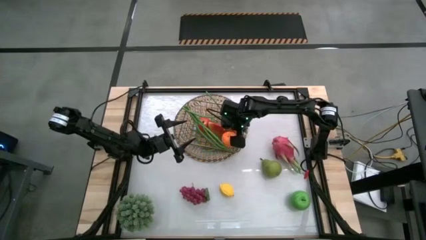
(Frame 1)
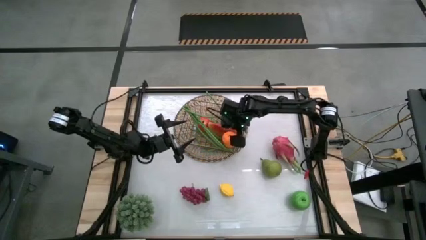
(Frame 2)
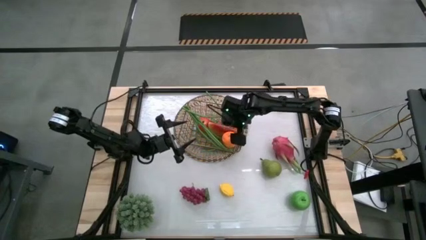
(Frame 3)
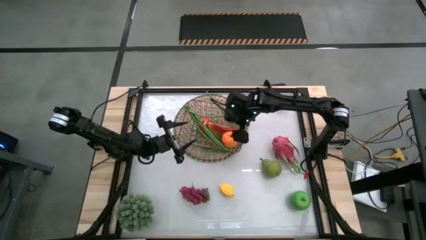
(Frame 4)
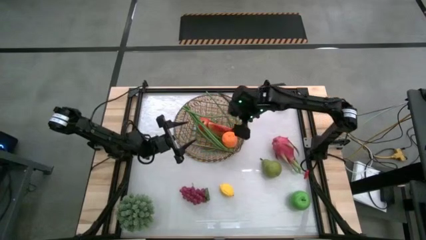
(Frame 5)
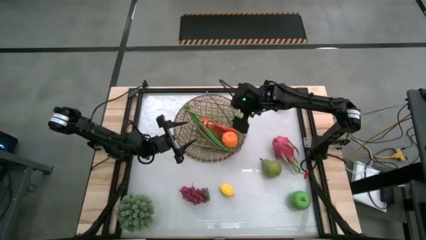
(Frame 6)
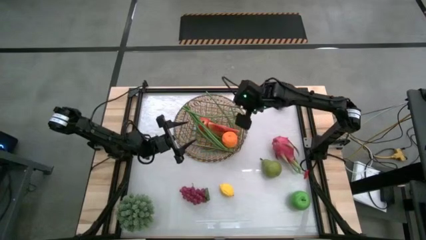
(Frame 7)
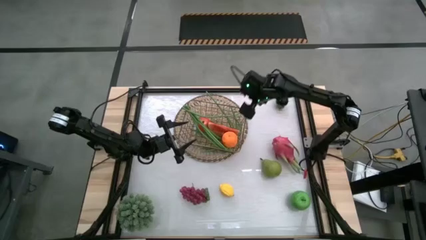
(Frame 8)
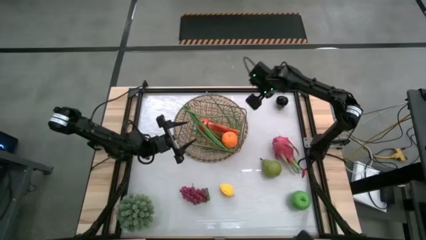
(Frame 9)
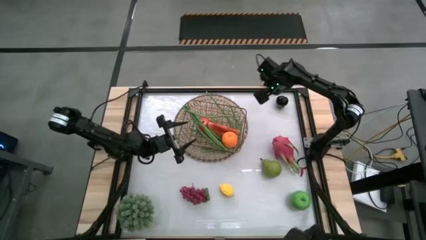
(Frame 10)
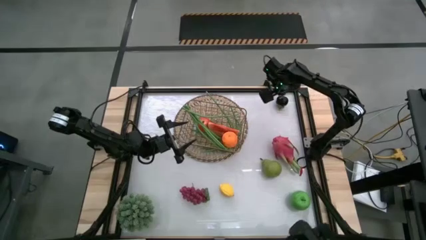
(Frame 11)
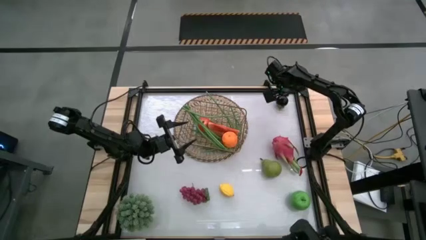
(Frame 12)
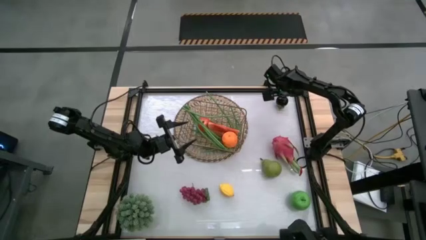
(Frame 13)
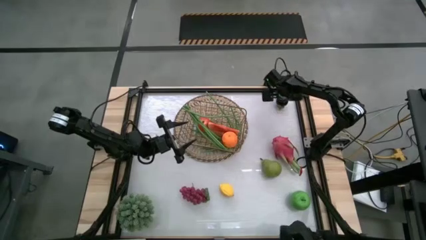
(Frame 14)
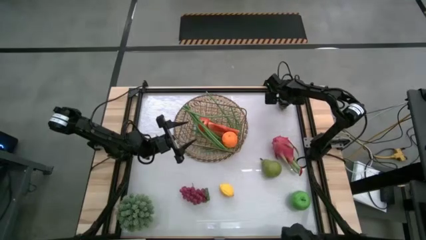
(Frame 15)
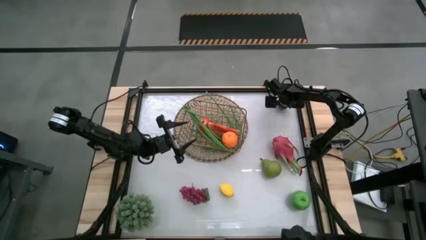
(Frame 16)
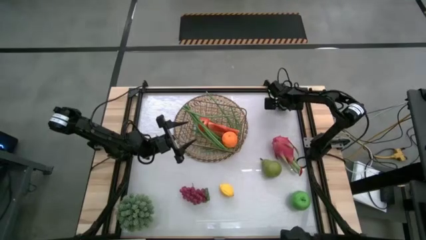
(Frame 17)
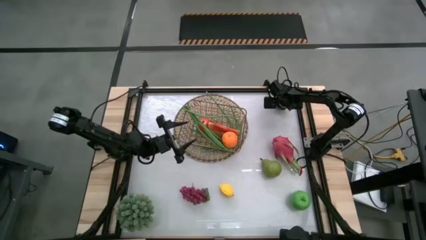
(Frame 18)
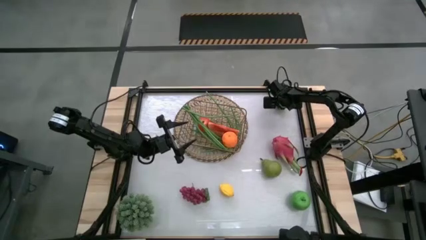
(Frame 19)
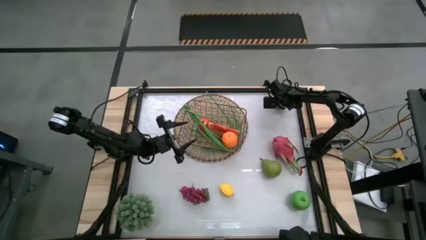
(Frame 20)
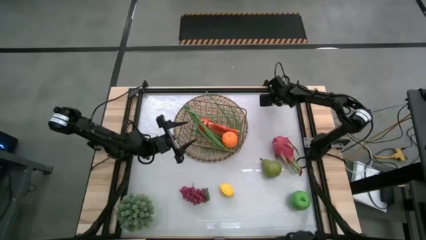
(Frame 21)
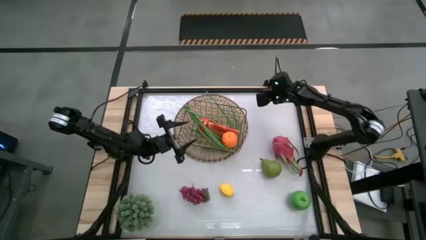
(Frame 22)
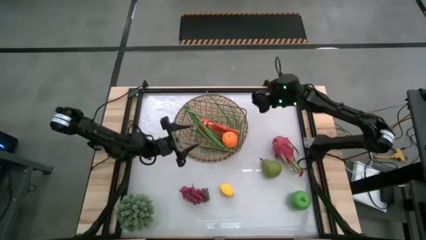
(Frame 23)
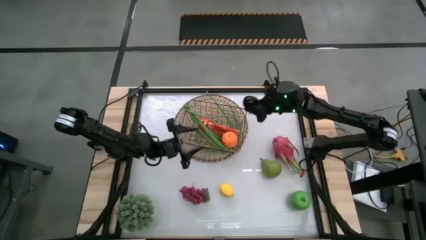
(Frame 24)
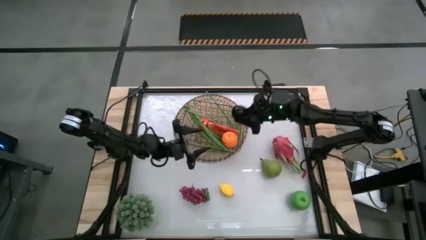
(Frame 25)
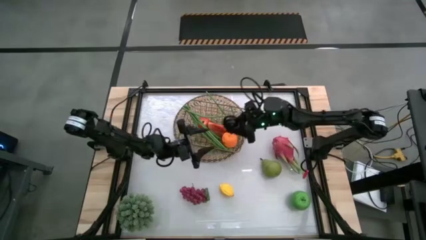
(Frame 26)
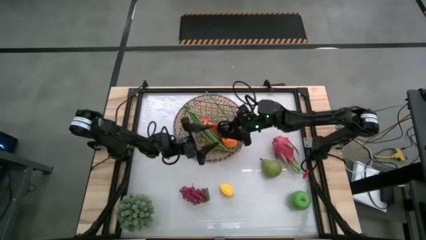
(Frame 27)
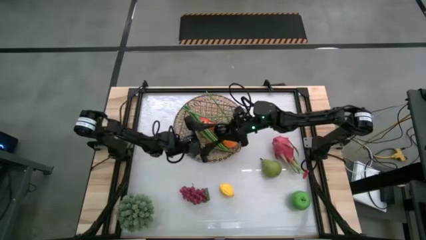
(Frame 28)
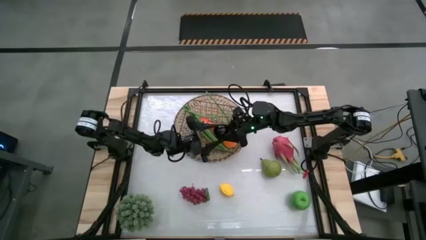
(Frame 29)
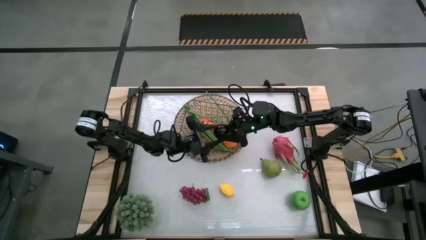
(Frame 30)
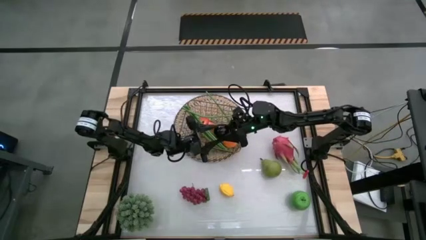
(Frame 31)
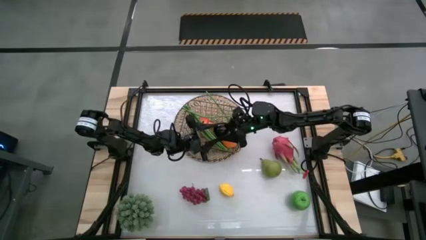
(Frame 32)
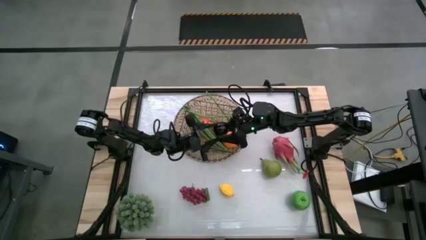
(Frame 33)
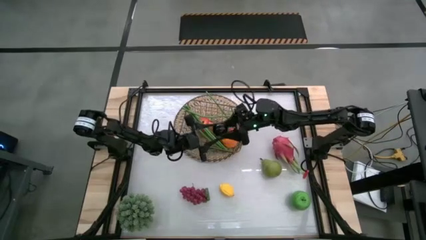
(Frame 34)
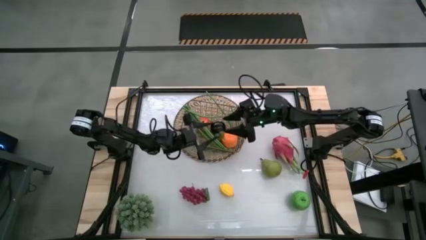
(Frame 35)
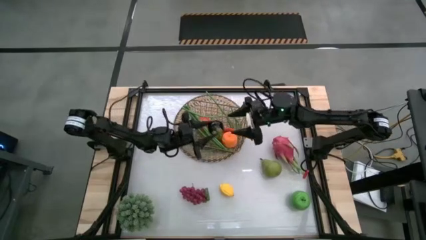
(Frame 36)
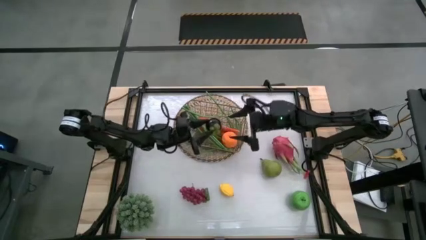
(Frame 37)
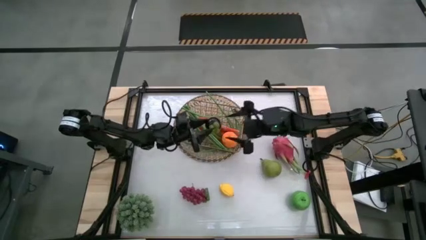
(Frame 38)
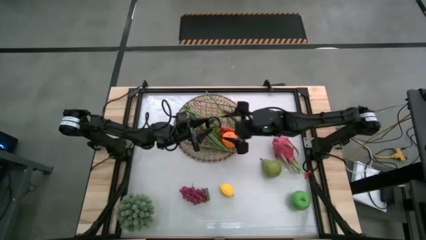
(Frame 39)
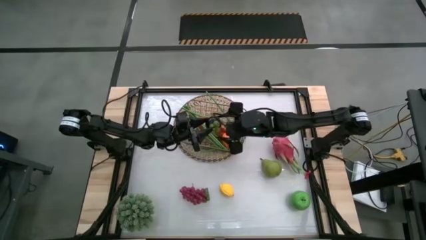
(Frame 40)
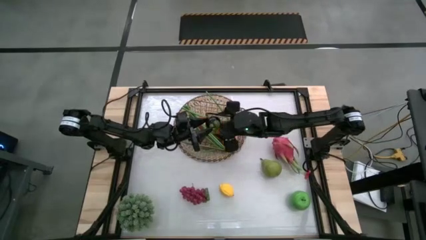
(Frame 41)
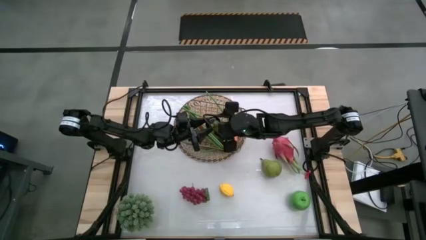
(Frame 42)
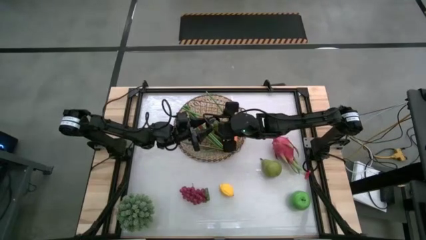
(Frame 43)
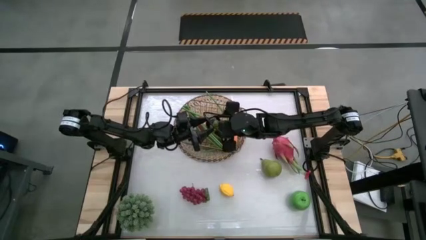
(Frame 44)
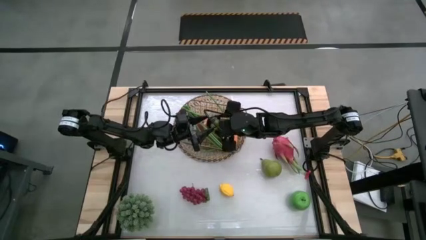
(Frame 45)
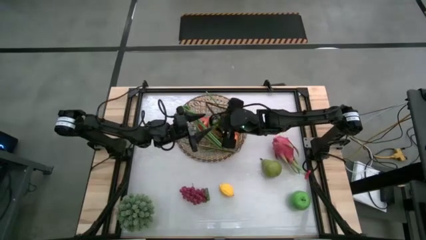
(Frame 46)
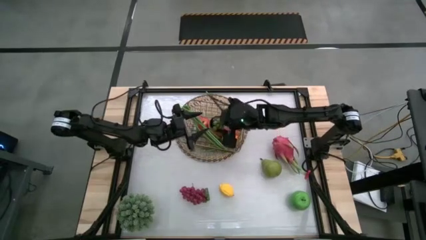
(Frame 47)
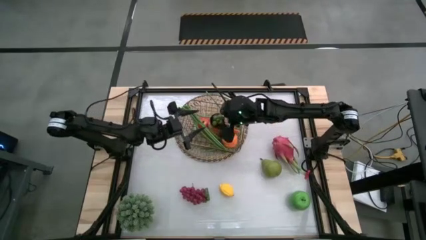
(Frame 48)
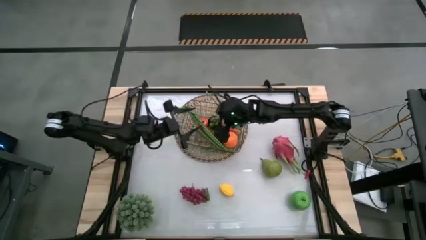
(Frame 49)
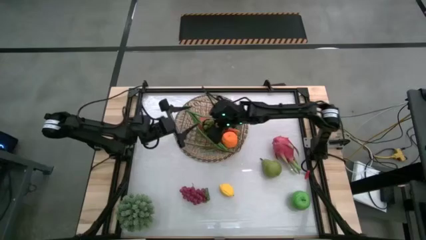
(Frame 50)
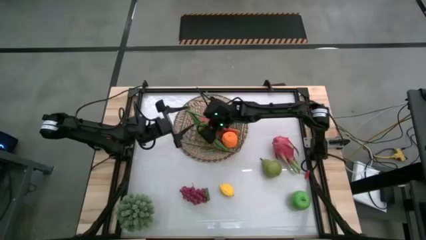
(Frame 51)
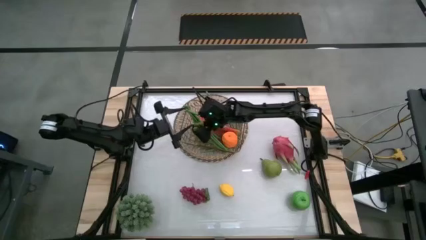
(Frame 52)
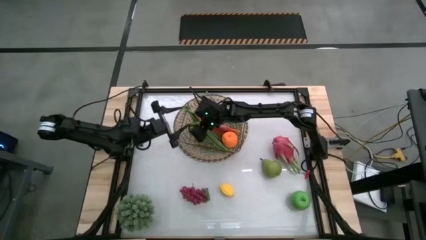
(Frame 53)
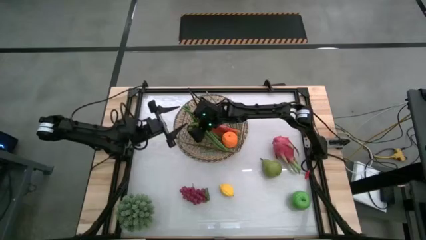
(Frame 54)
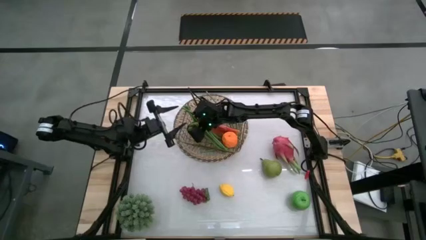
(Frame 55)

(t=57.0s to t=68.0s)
Task: Build produce basket
Put the mangosteen into the wire basket

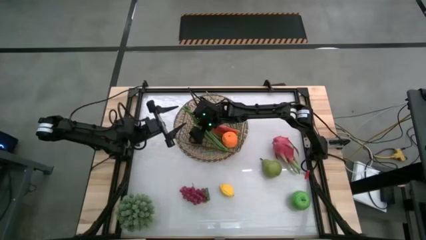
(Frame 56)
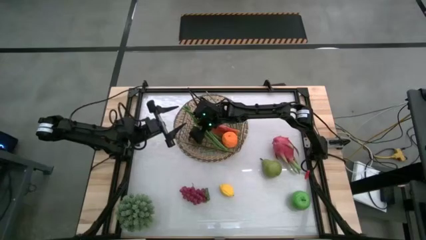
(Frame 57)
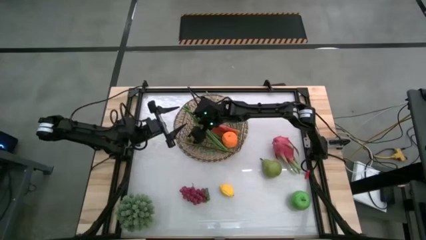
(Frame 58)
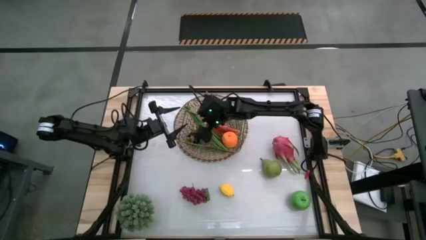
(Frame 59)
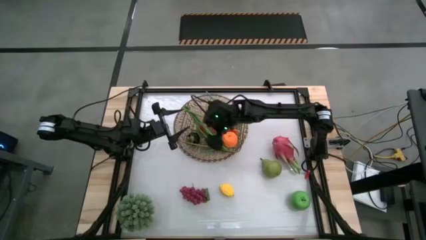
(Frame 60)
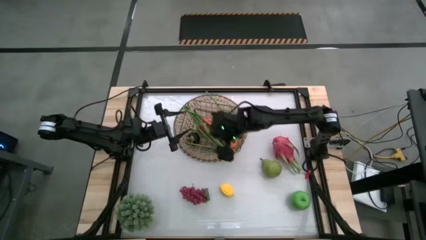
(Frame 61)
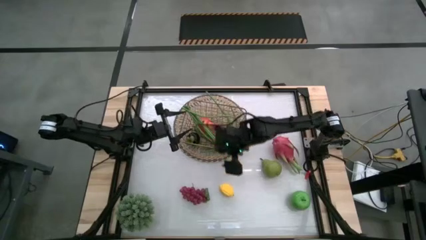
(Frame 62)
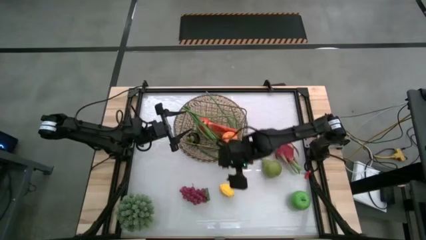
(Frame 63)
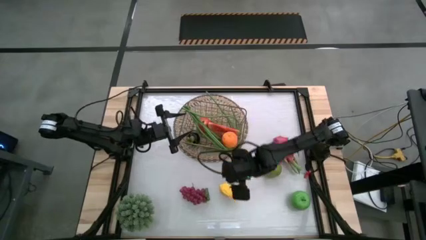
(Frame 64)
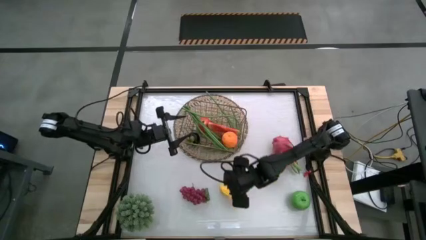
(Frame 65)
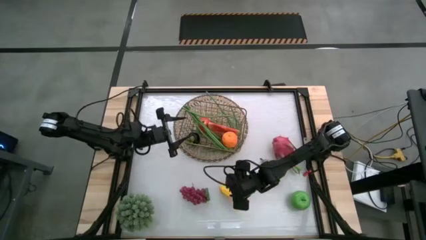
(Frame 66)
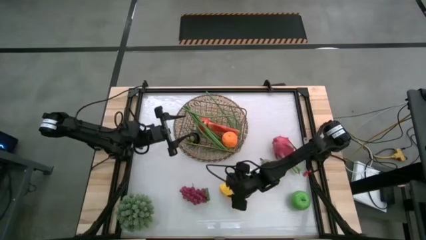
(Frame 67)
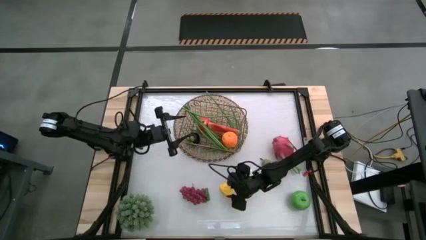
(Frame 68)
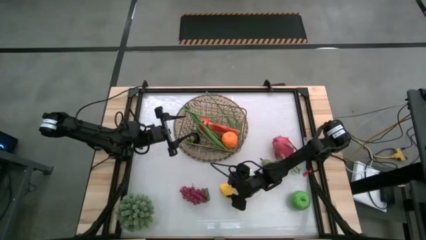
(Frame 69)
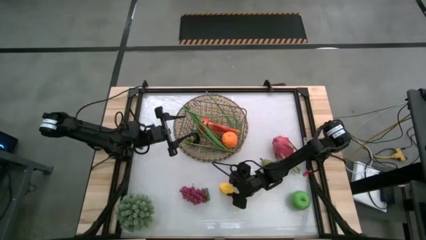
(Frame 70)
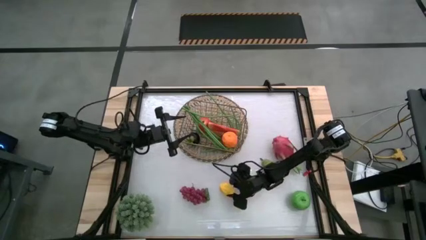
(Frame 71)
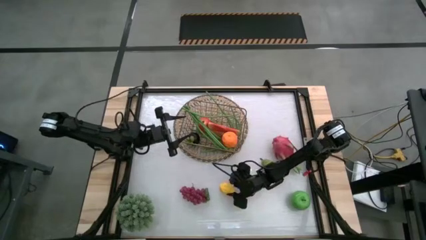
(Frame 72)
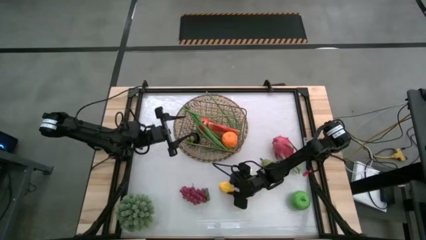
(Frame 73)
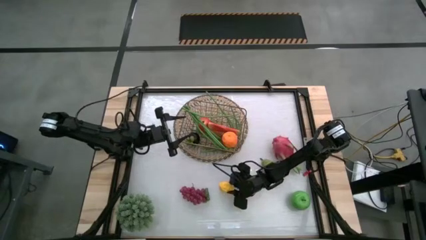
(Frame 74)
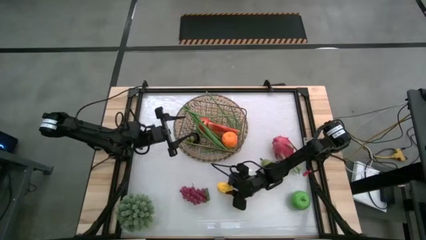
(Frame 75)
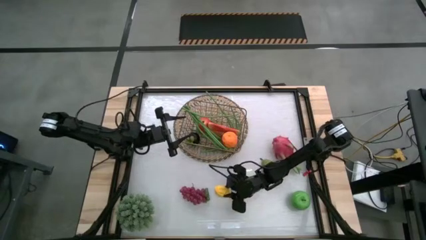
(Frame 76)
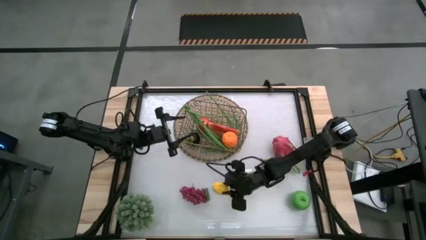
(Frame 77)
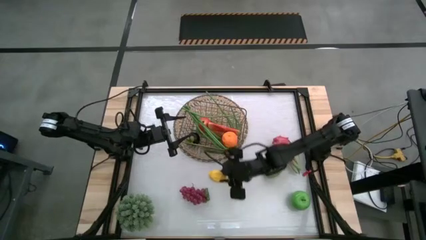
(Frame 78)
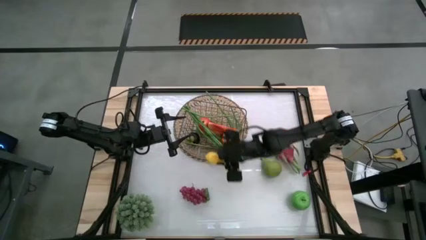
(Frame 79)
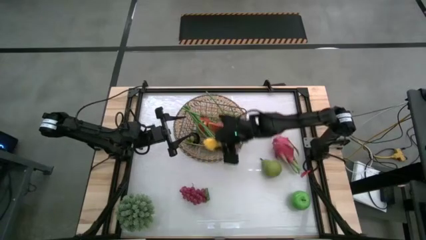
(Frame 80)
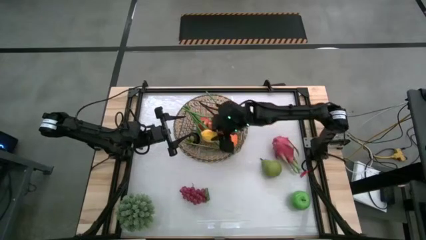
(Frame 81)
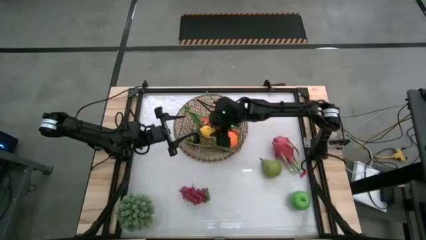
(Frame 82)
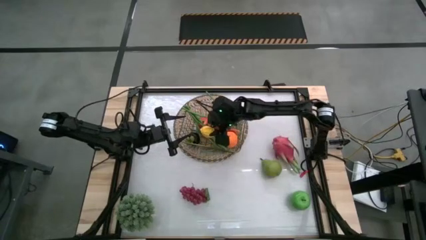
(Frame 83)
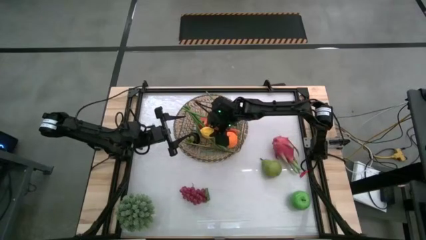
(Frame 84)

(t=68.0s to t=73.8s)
Put the lemon into the wire basket
